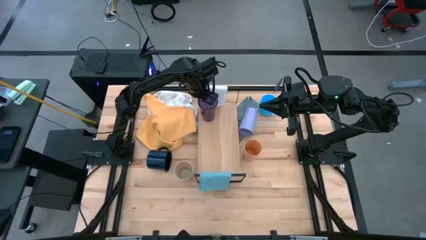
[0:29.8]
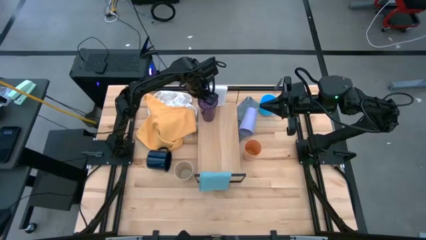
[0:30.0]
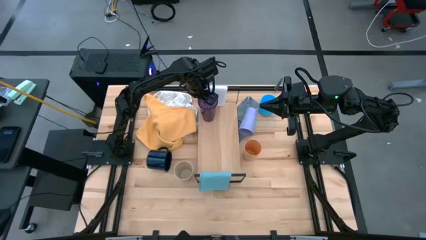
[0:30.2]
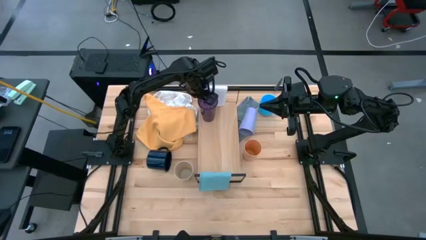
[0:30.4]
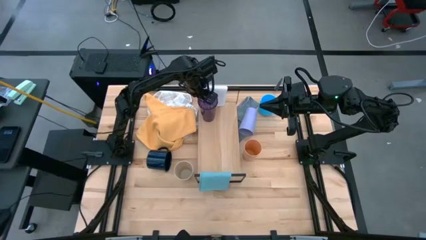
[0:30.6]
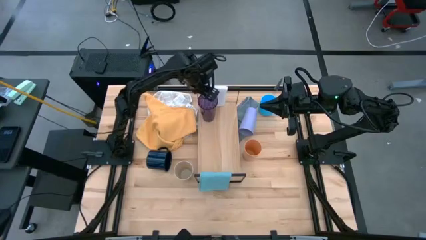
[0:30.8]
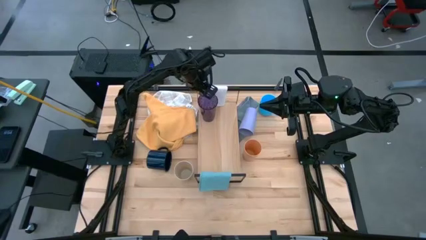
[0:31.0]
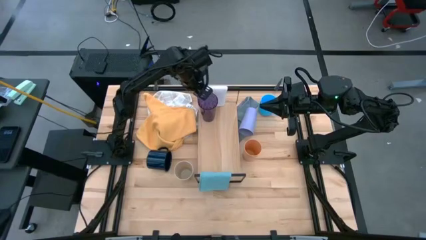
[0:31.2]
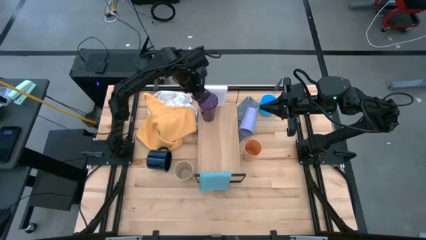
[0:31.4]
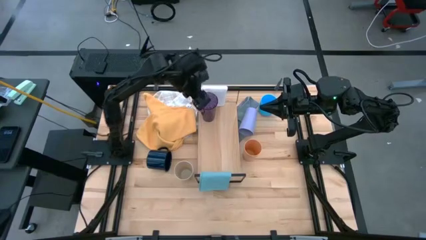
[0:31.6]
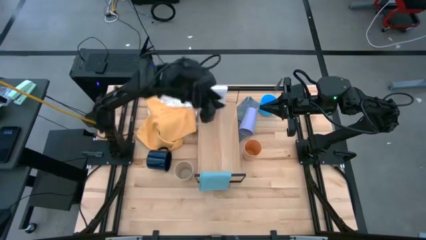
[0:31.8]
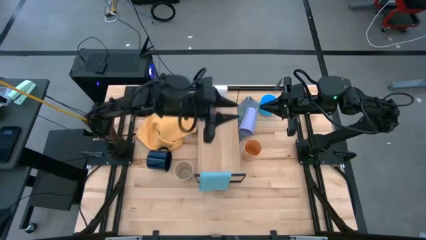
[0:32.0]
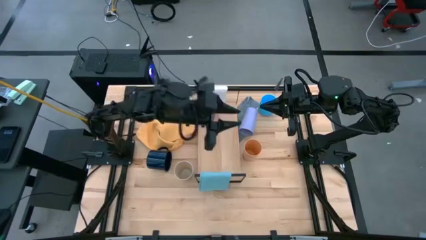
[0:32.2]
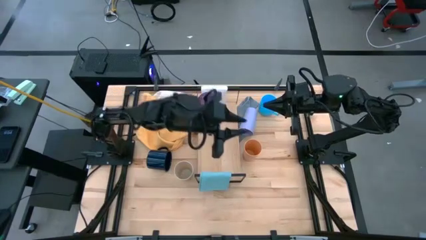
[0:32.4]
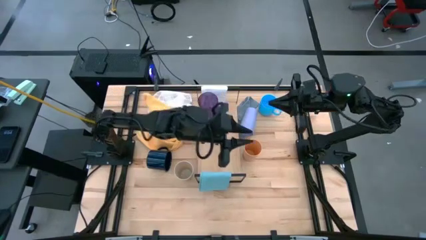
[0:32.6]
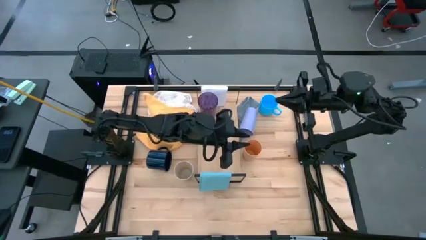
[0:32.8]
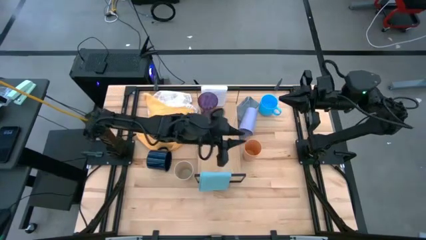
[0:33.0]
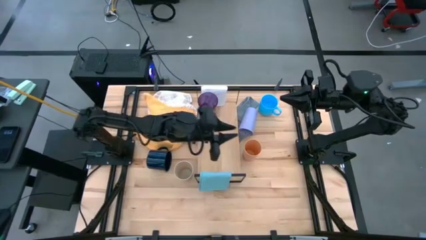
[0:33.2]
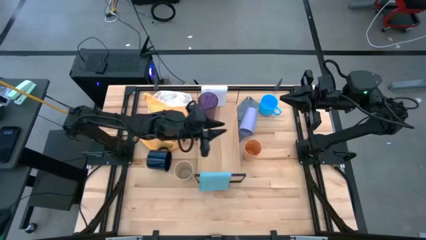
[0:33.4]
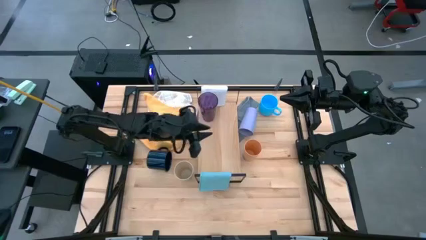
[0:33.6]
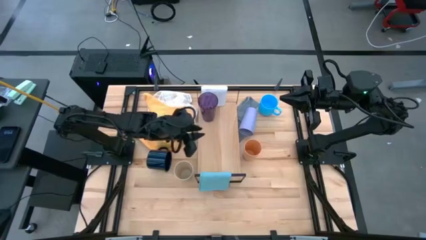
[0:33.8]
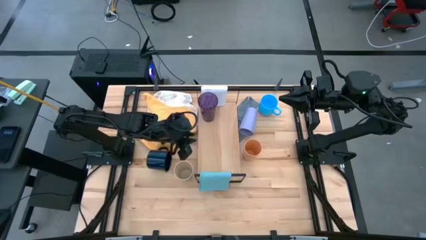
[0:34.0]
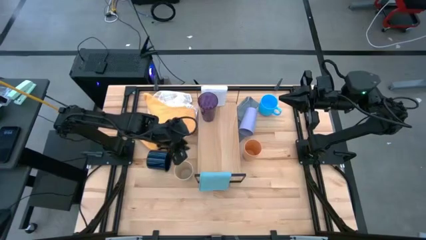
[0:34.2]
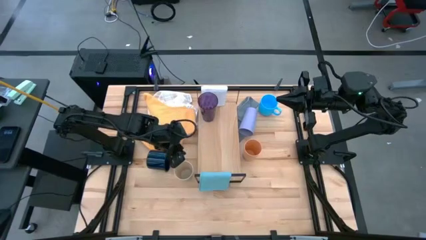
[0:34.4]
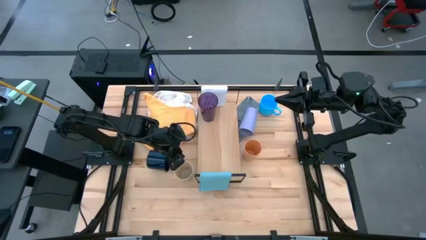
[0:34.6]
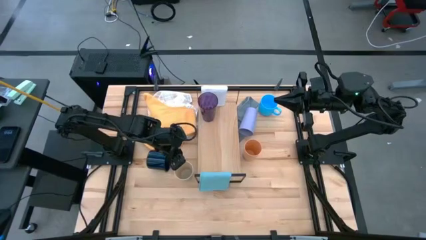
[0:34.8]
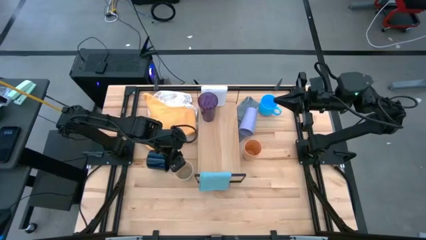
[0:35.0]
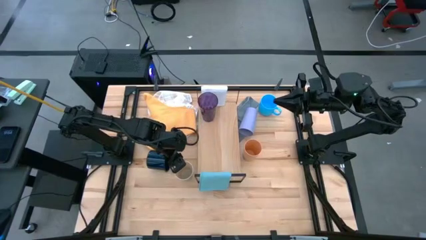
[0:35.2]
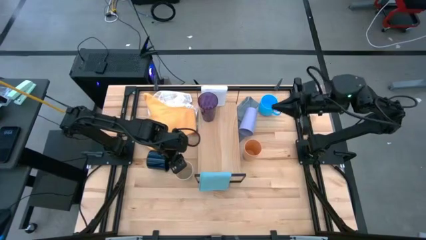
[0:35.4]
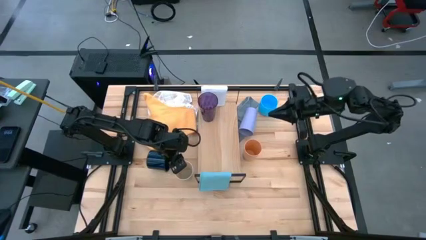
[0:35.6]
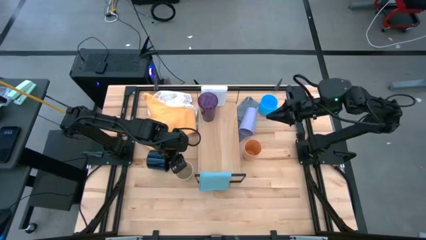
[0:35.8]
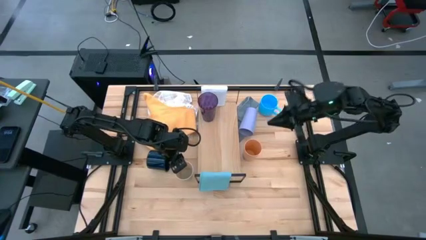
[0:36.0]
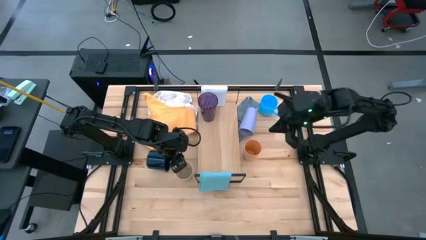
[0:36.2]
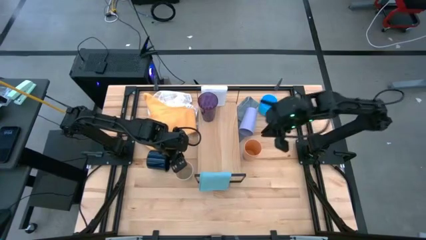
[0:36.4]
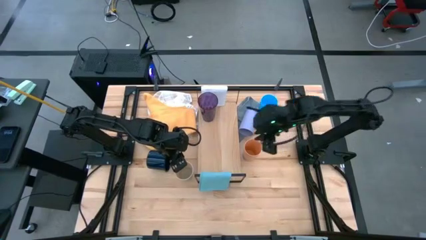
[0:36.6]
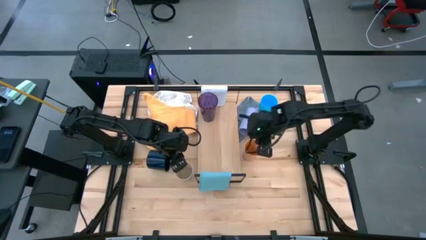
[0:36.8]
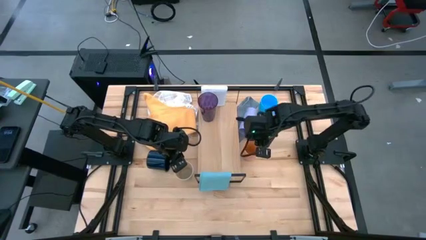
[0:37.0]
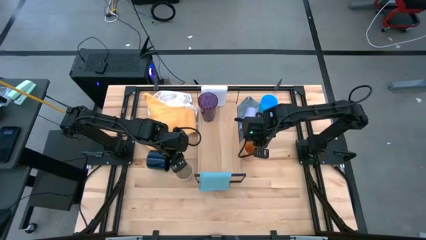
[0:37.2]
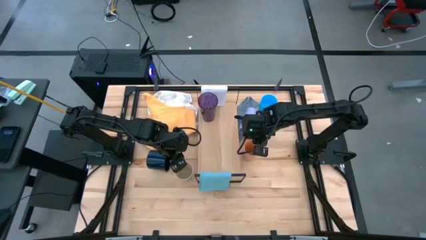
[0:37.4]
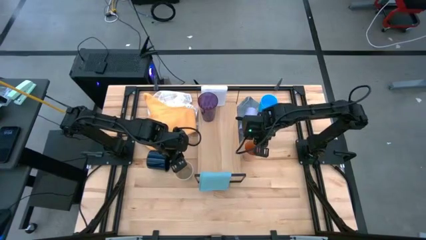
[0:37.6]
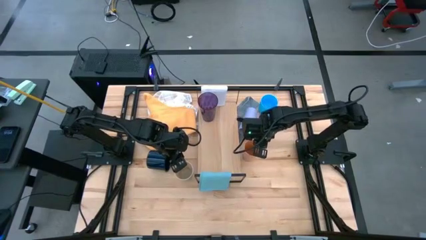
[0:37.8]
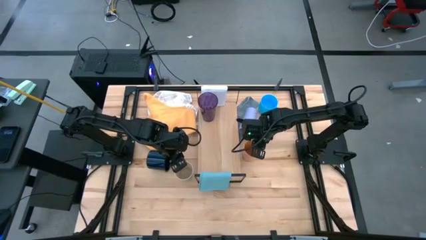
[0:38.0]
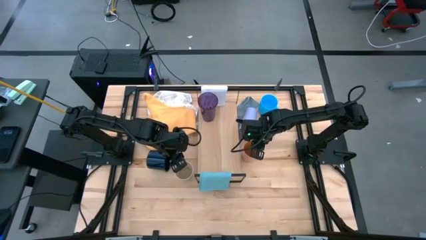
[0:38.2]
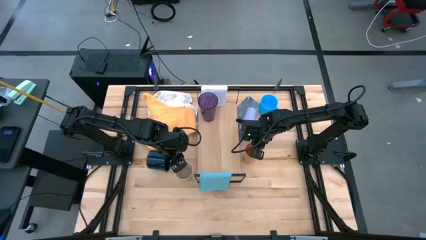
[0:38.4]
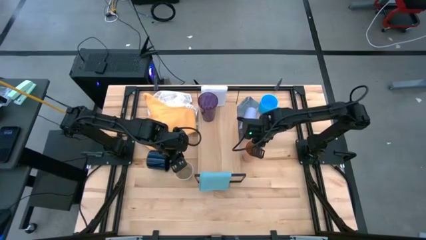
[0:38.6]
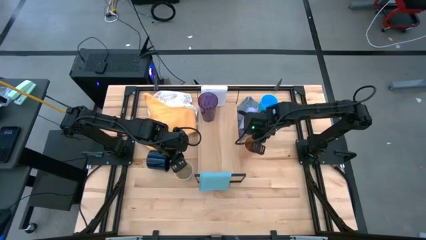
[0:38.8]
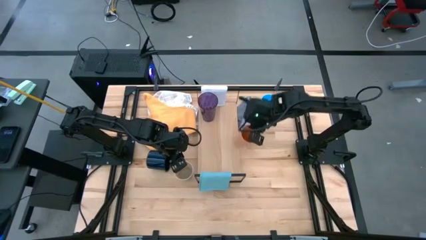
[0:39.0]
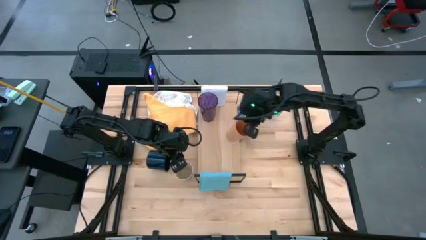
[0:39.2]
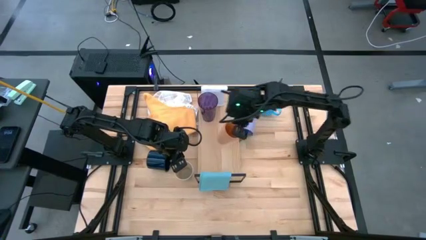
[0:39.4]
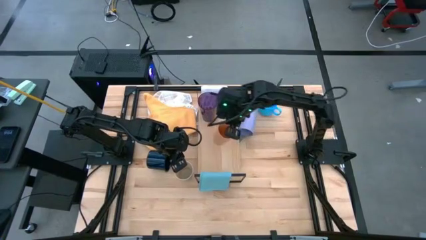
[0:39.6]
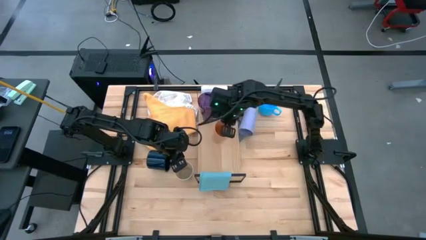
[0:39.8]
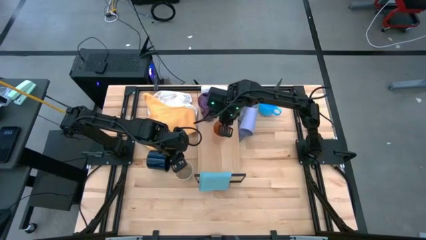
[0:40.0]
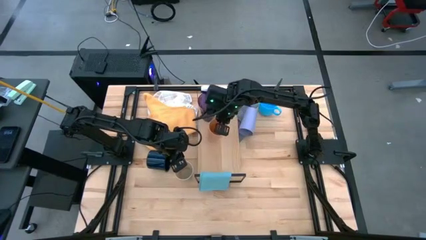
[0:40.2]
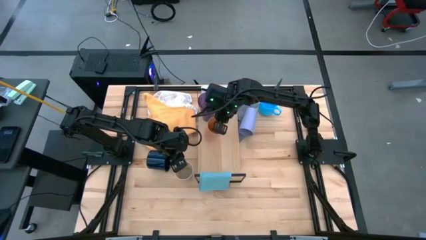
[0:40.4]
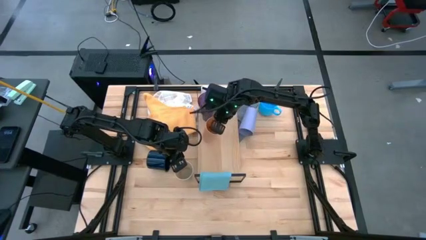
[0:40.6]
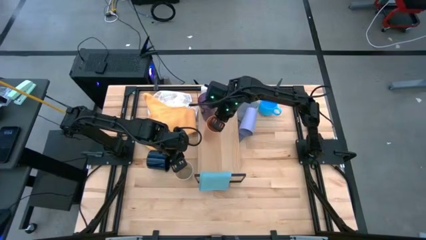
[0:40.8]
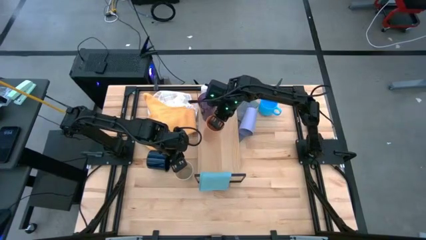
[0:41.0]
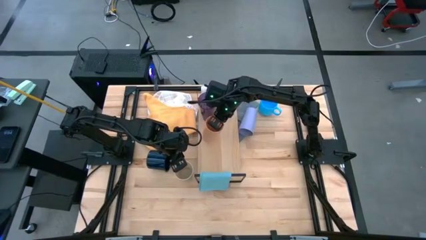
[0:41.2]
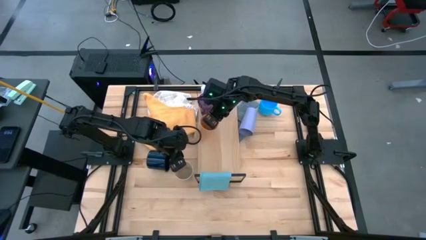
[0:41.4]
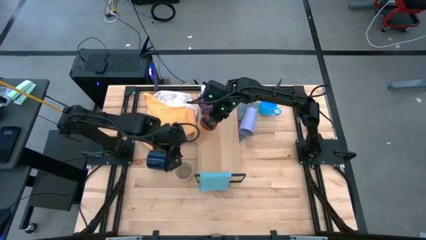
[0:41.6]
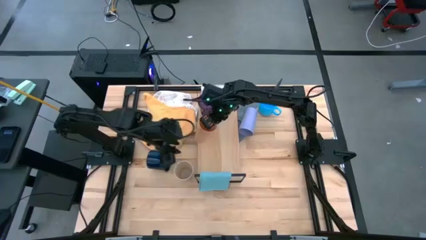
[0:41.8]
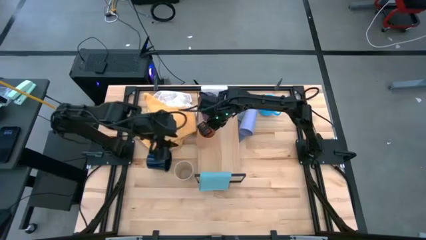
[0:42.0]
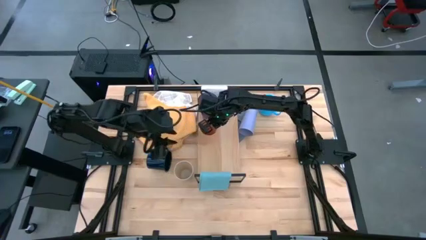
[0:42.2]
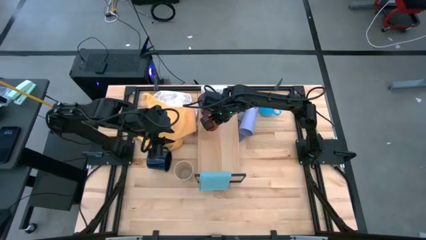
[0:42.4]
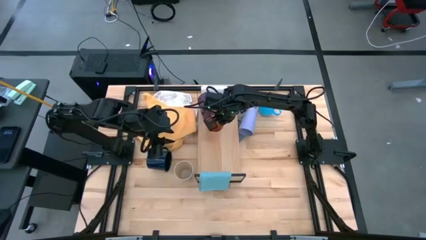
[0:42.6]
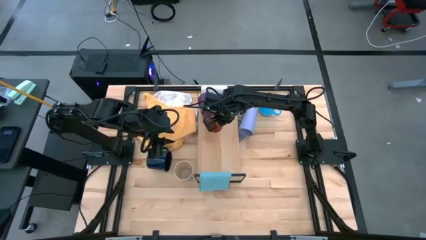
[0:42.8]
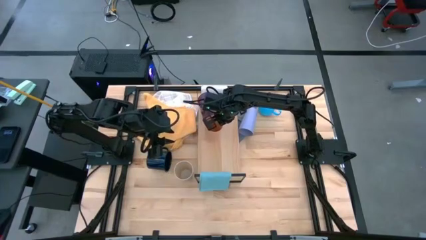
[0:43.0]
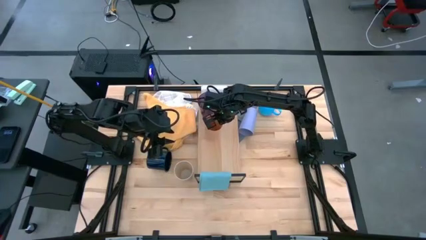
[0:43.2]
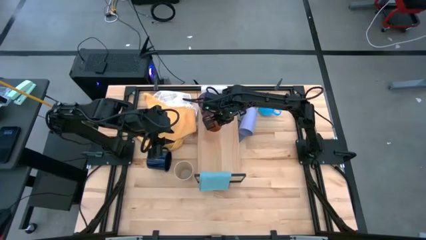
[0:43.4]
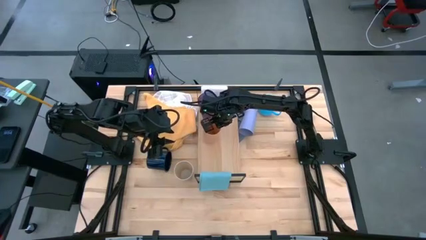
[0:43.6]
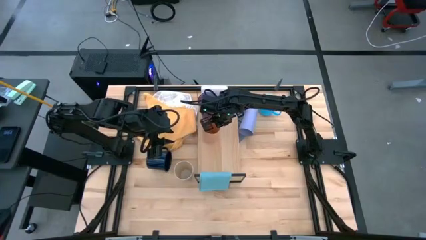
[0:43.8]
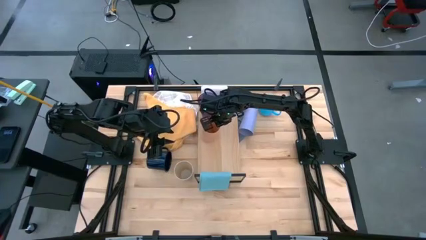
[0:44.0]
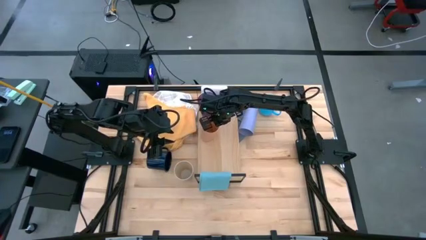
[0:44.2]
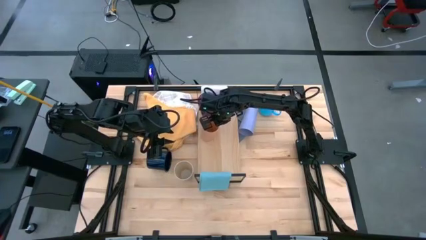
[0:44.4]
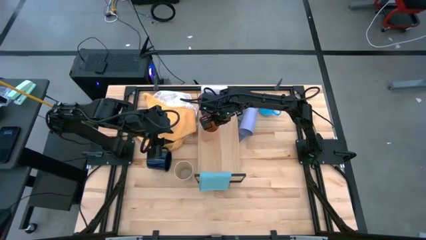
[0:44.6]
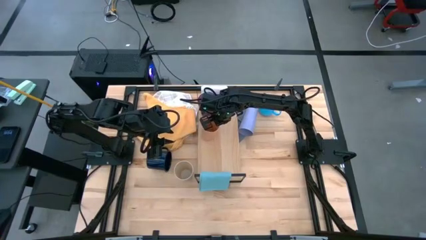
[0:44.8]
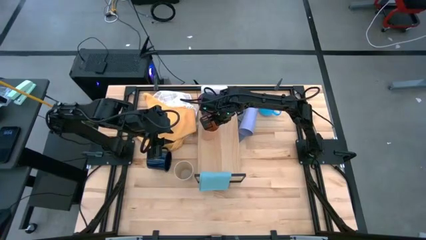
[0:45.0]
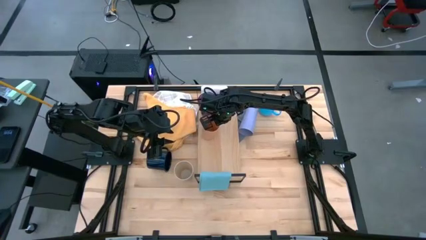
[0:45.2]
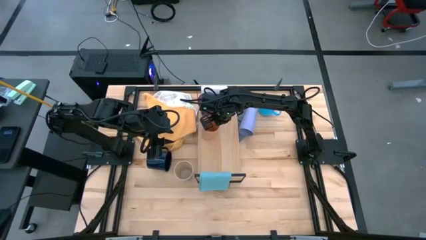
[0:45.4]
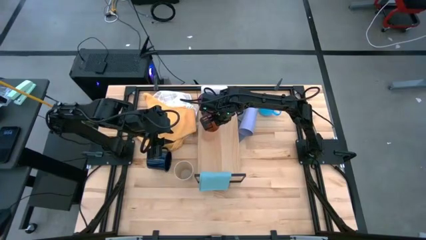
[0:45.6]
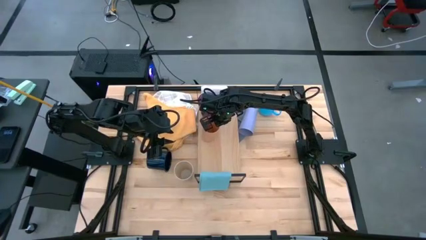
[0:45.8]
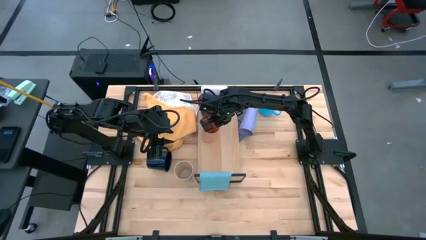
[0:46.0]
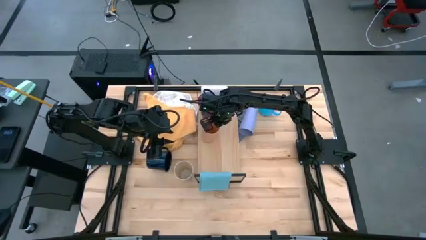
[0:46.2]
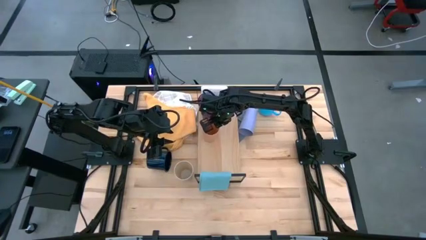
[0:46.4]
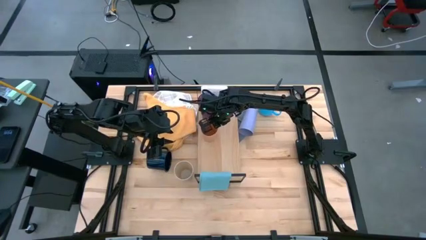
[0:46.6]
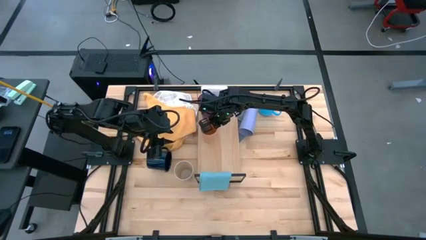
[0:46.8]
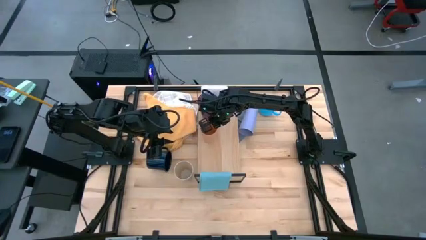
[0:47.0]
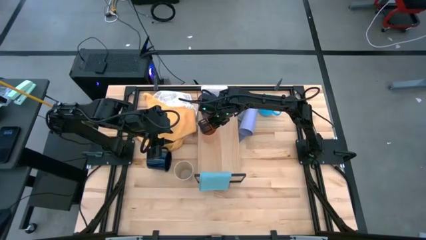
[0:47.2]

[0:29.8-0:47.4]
Task: Stack small to large cups/mugs on shelf
Put the orange cup on the shelf
